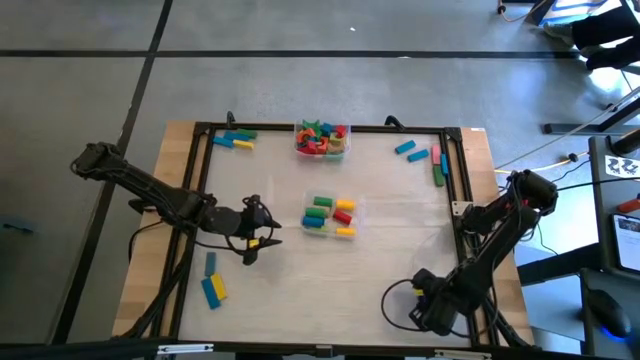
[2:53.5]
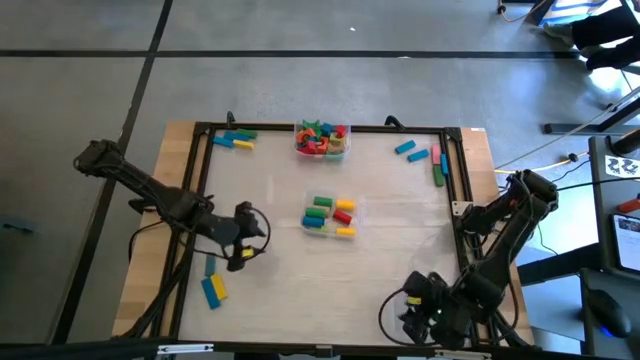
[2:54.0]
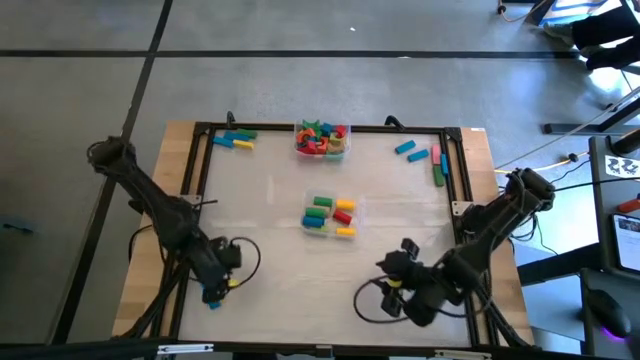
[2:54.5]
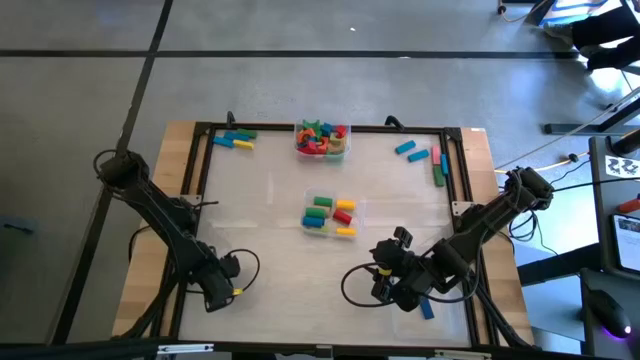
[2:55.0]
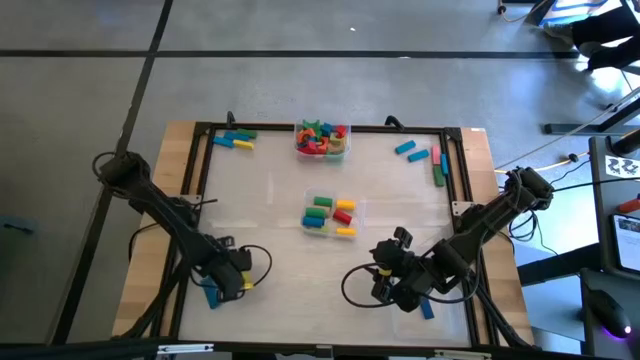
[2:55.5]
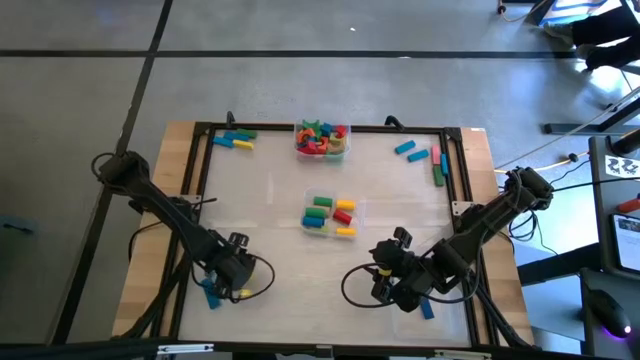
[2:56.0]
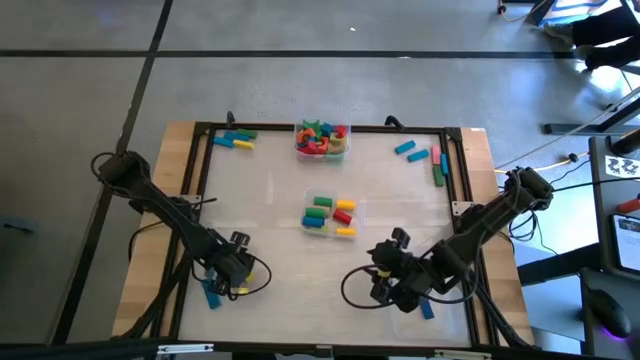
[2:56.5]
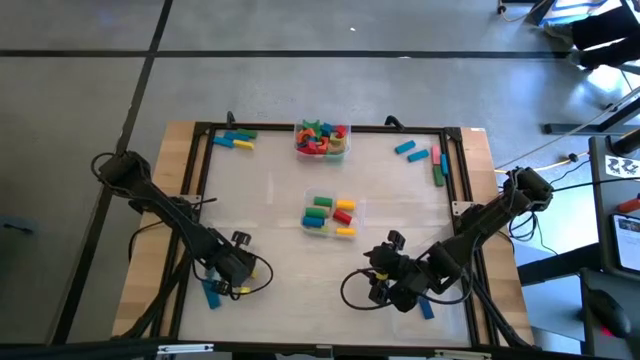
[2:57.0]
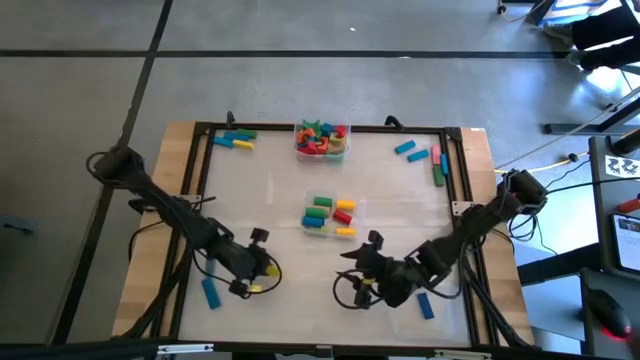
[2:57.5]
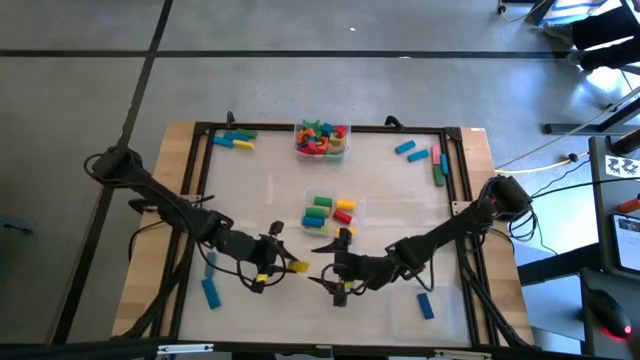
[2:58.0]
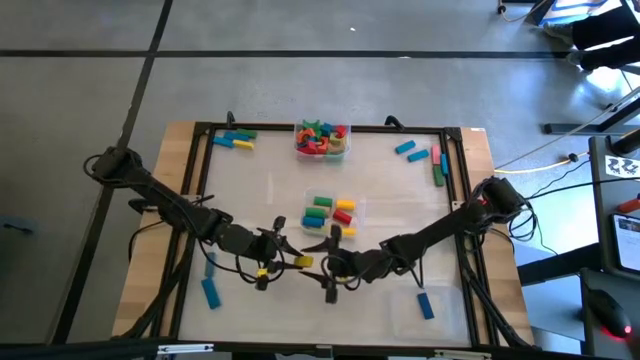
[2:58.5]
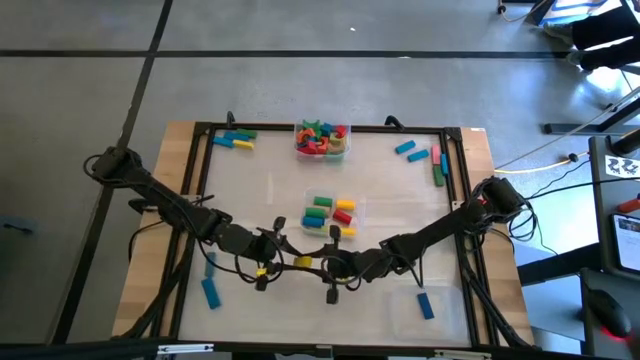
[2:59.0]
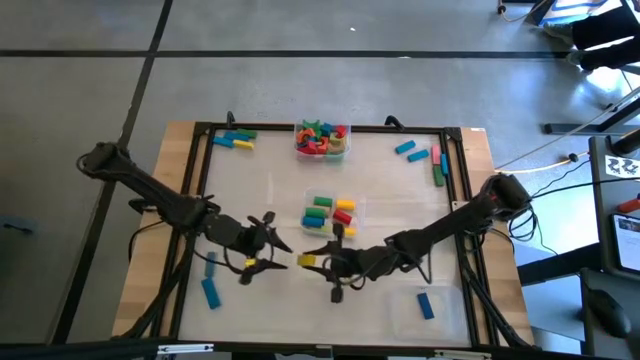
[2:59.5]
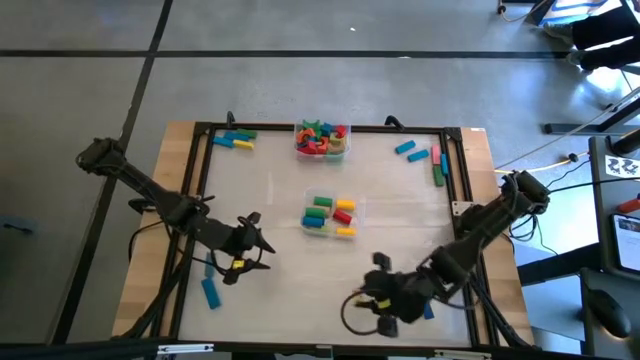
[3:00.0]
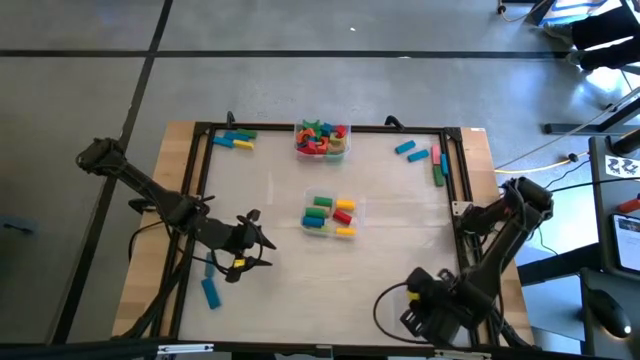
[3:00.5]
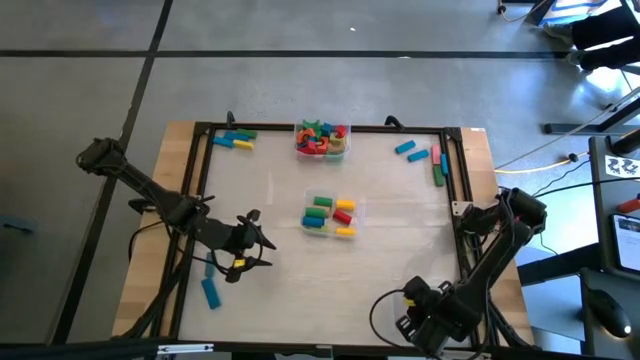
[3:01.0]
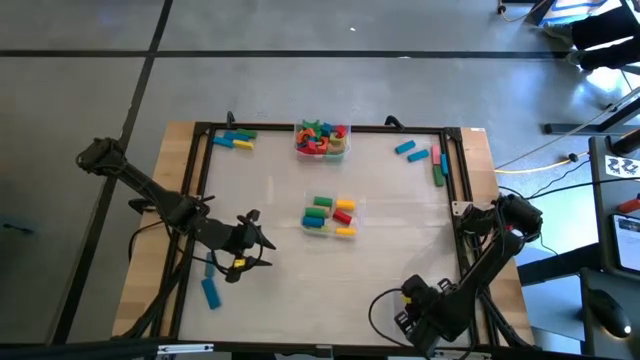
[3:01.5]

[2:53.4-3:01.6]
Task: Sort blocks by size
Put the yellow rectangle block into the bottom transparent bin

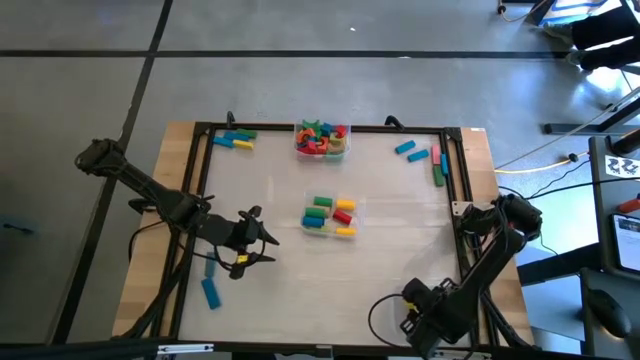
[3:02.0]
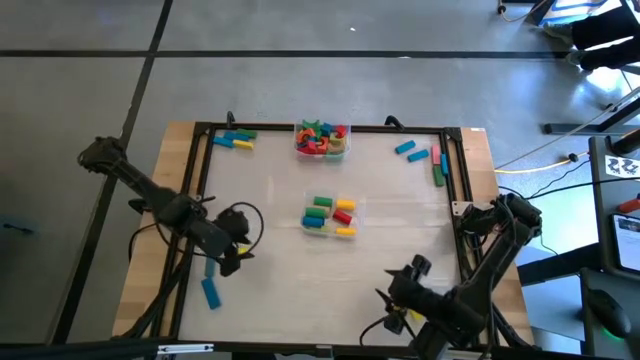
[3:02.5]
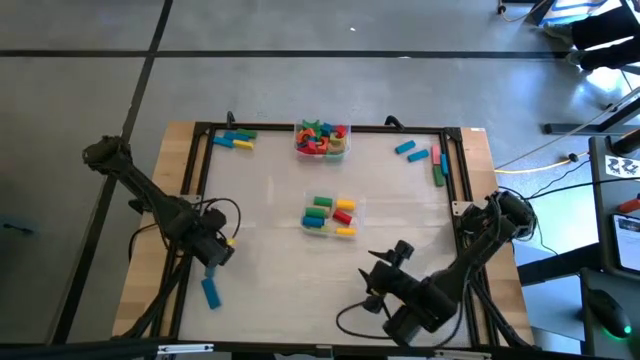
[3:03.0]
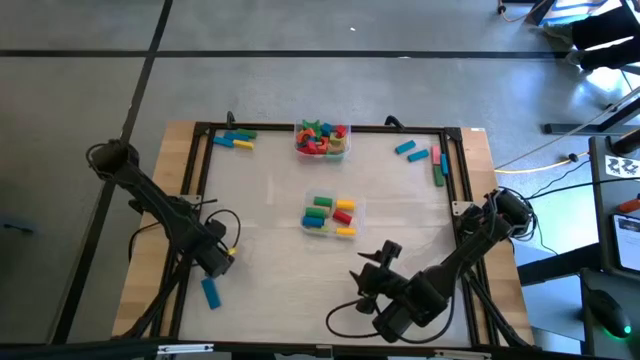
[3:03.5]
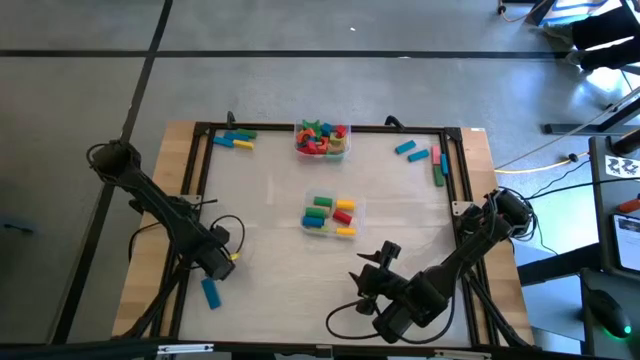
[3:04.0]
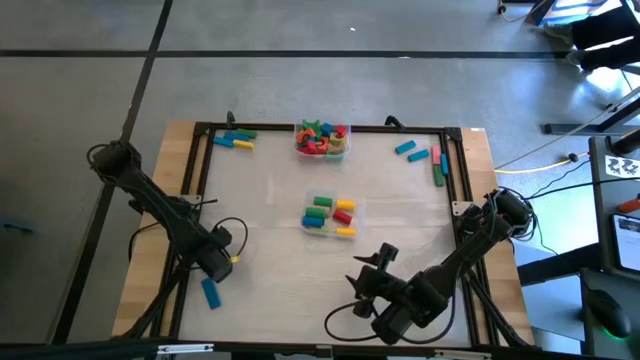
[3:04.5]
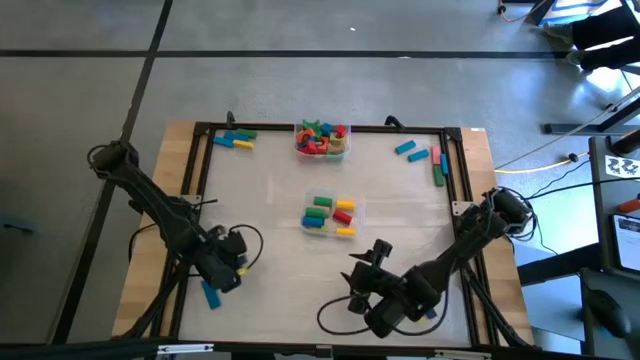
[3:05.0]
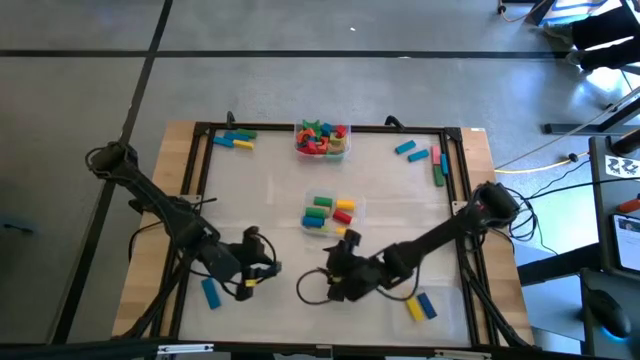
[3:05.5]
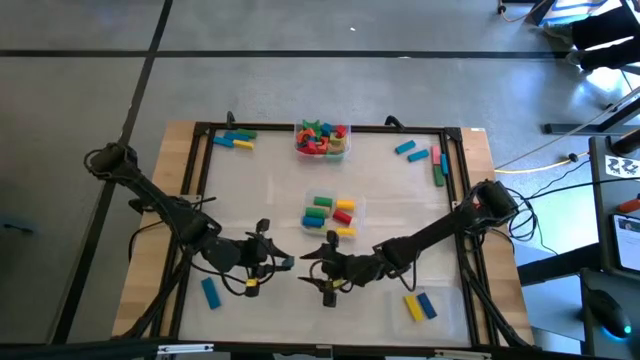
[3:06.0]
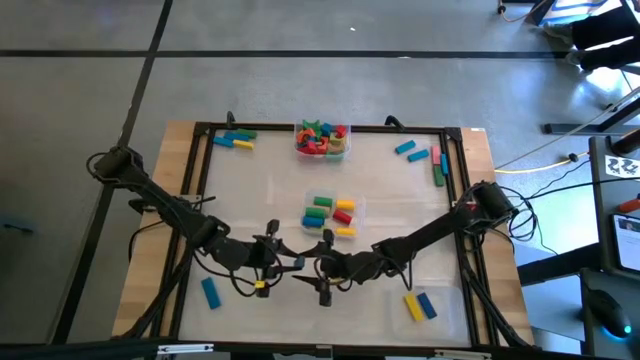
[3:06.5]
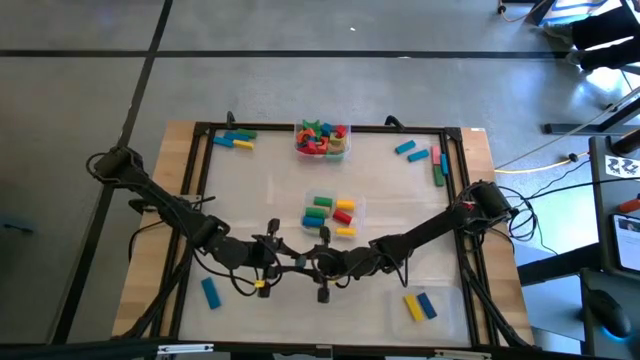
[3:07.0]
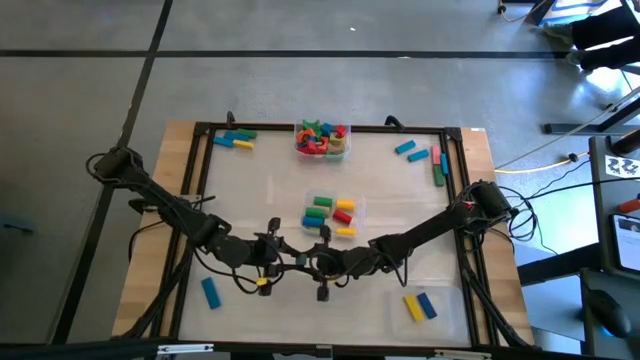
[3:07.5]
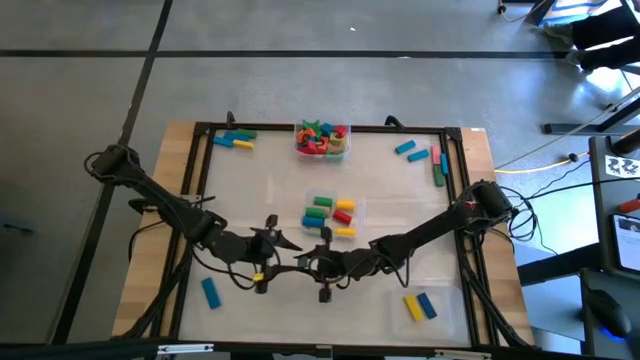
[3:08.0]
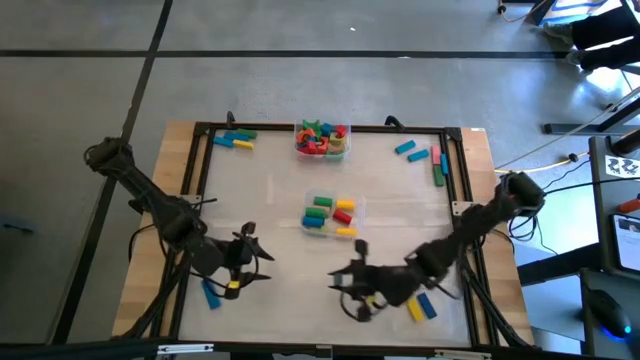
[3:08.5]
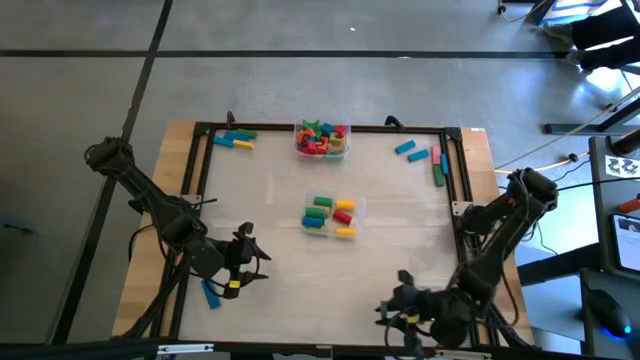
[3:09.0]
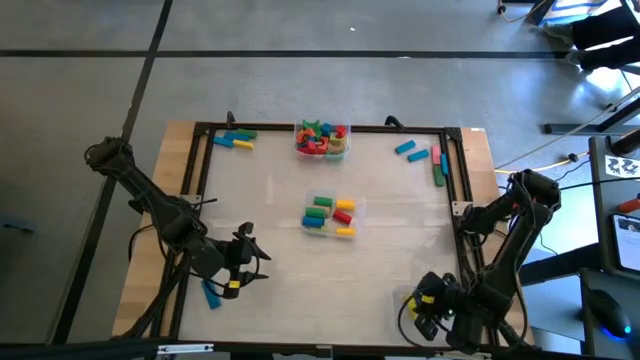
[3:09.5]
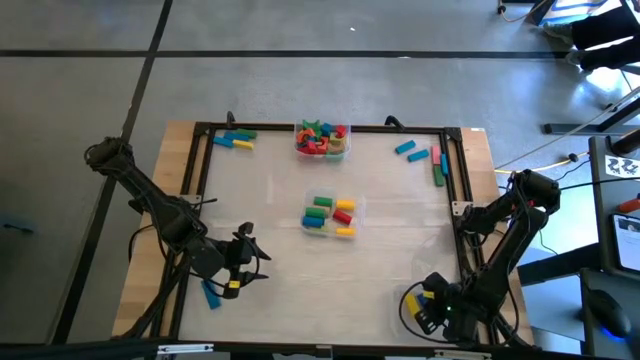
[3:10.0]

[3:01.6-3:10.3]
Put the light blue rectangle block into the bottom transparent bin

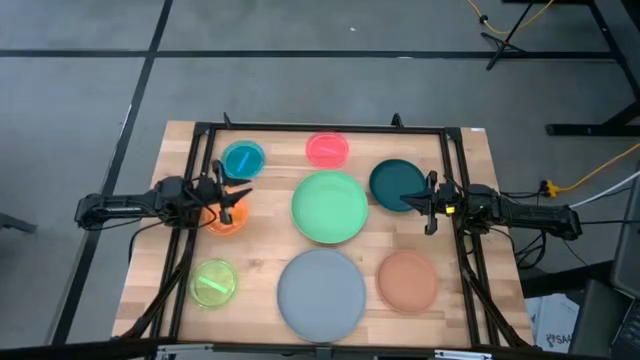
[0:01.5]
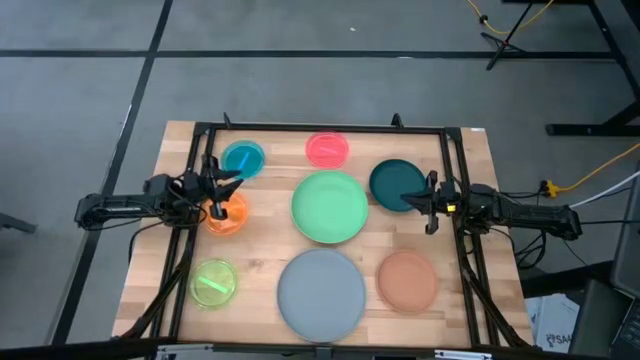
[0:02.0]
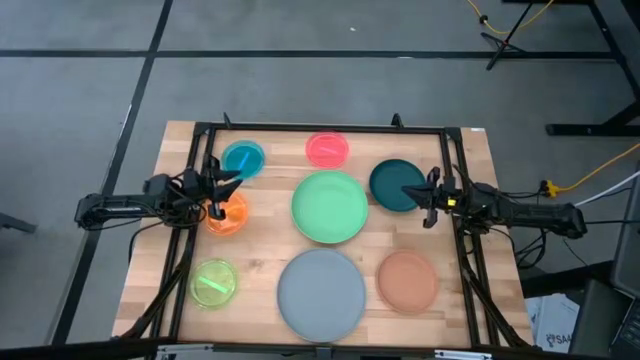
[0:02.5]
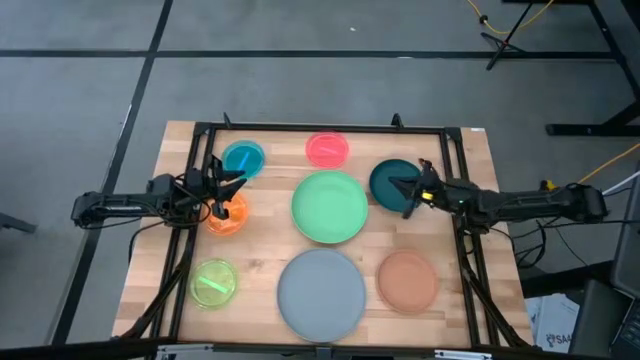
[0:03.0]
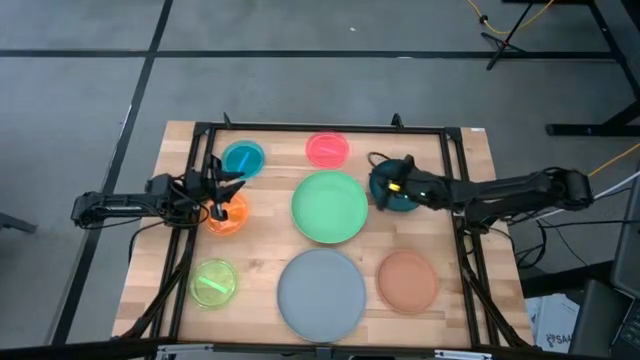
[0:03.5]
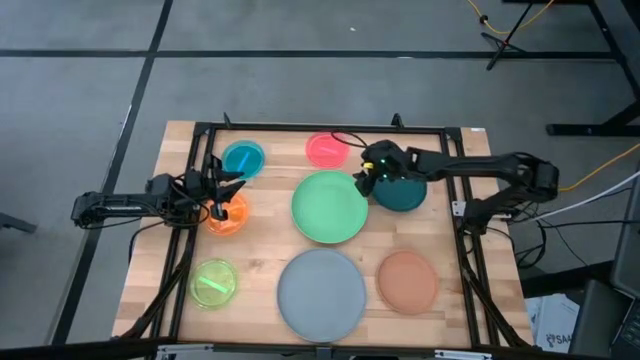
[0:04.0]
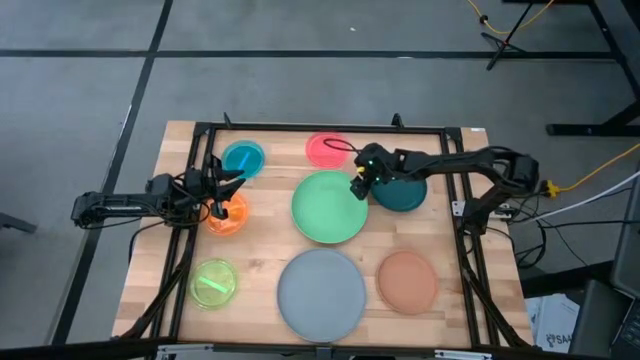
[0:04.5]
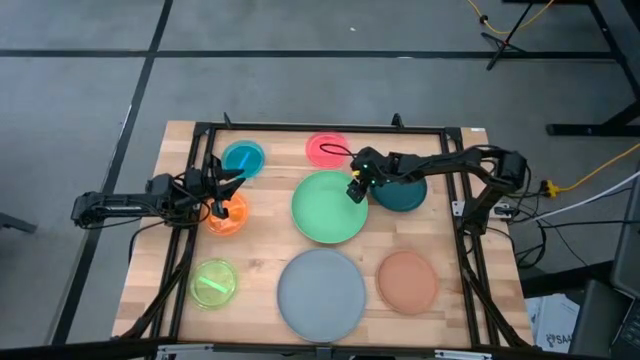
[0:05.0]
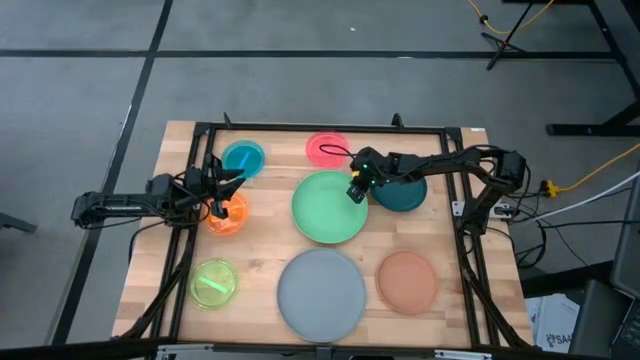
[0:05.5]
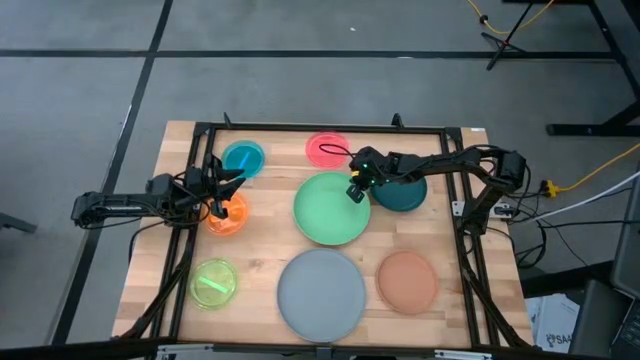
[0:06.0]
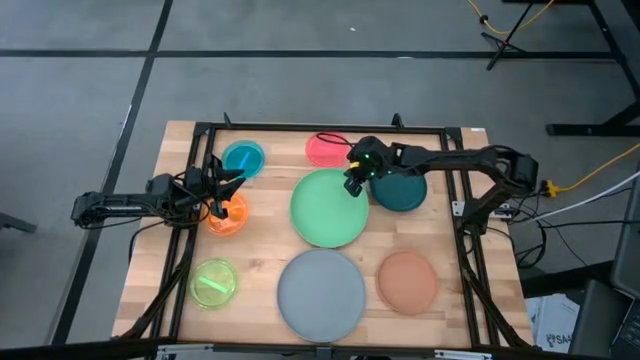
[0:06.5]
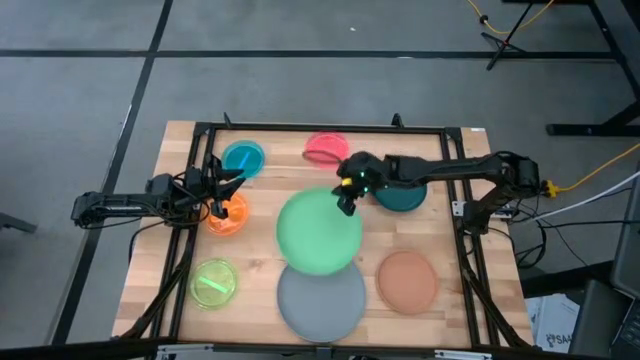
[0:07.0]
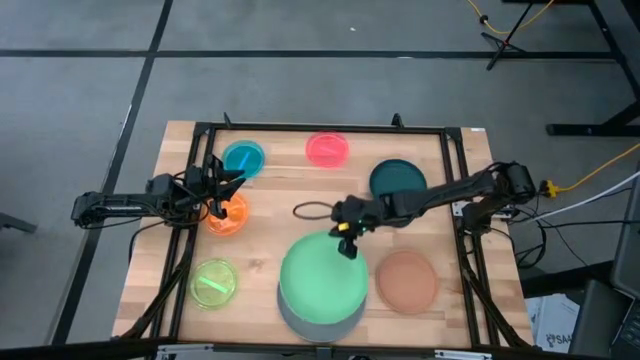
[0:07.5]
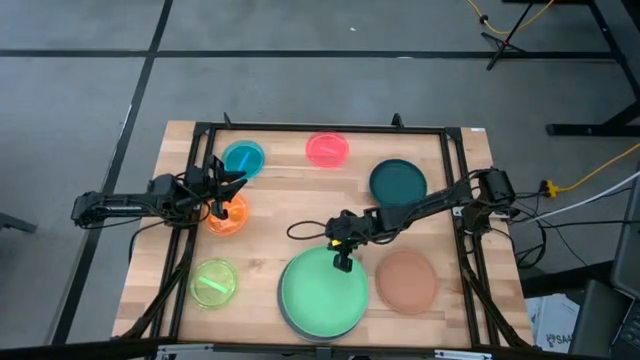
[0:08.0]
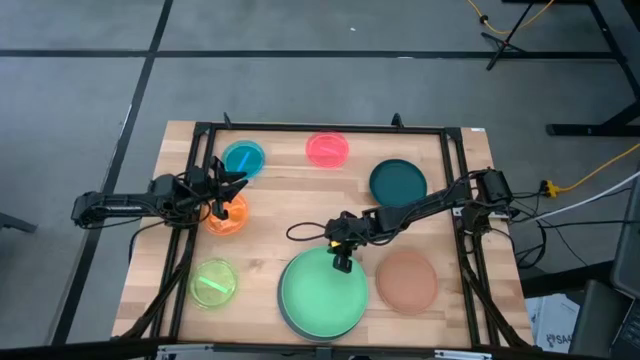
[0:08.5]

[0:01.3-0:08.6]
Task: Stack plastic plates
Stack the green plate on top of the gray plate
